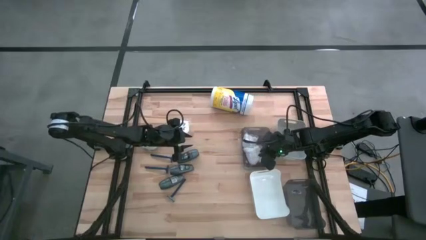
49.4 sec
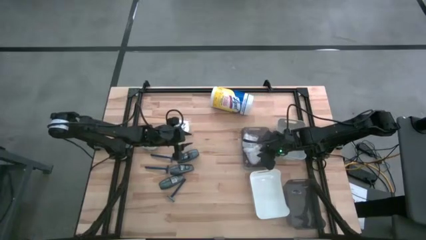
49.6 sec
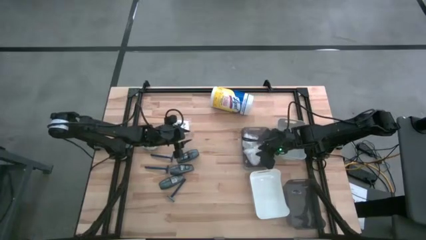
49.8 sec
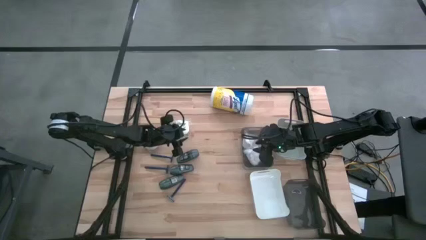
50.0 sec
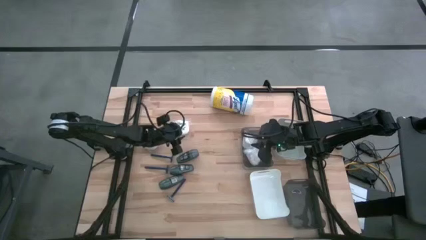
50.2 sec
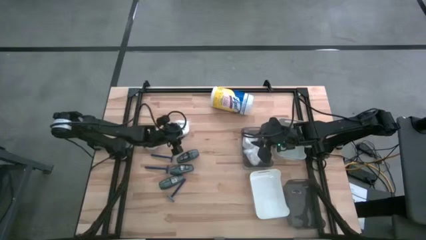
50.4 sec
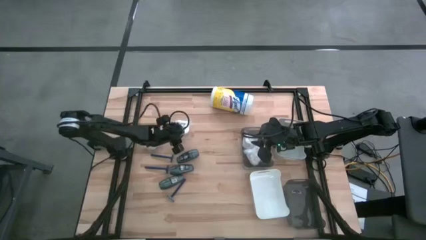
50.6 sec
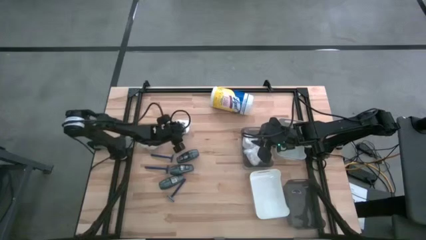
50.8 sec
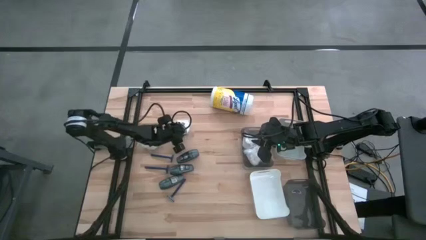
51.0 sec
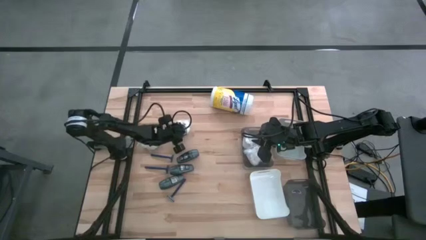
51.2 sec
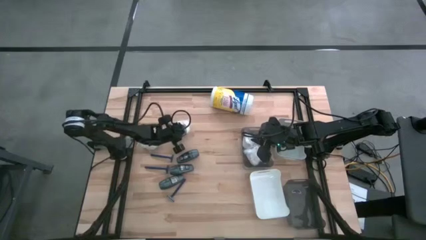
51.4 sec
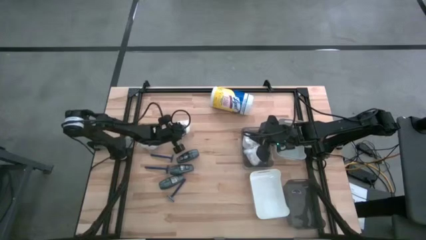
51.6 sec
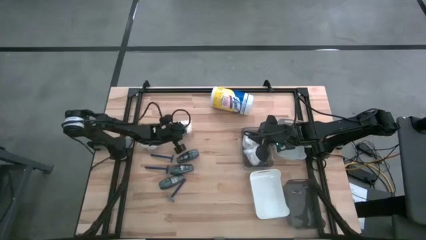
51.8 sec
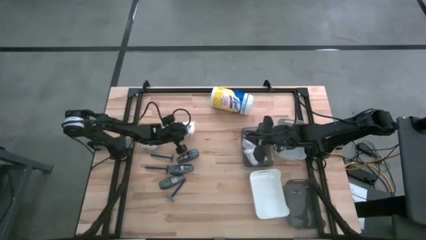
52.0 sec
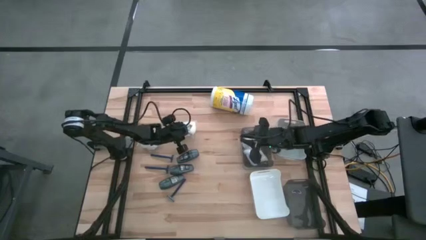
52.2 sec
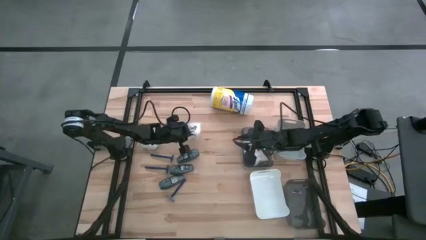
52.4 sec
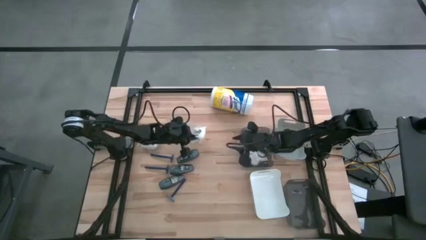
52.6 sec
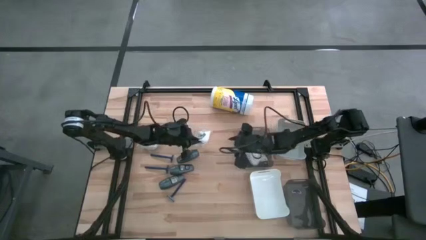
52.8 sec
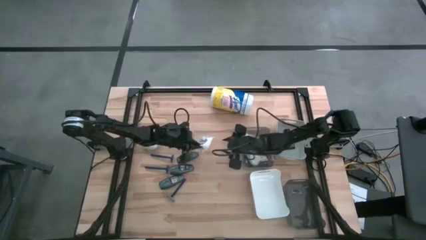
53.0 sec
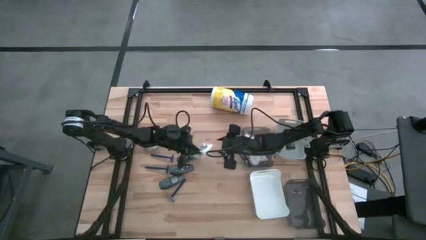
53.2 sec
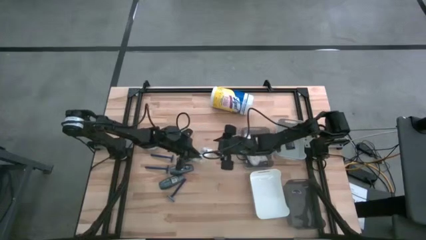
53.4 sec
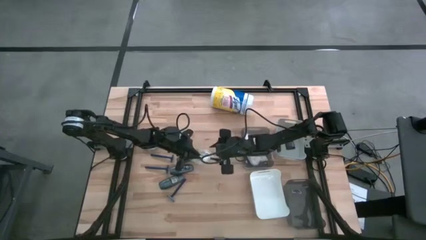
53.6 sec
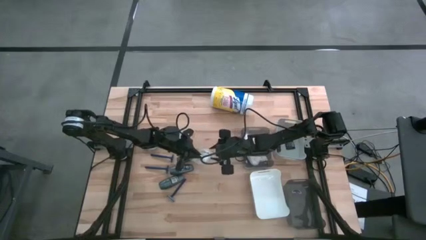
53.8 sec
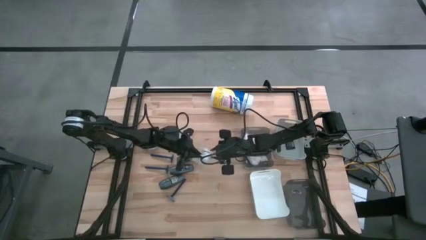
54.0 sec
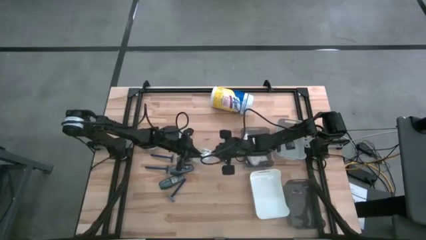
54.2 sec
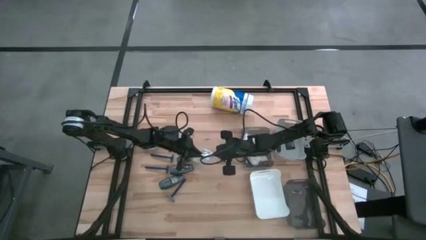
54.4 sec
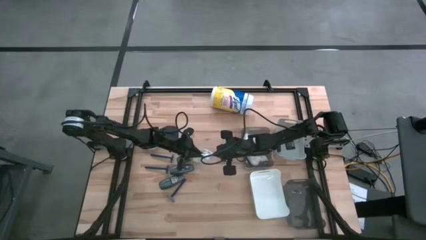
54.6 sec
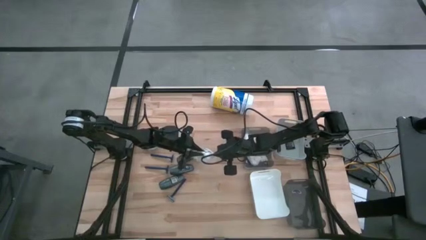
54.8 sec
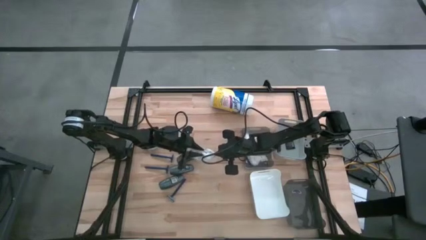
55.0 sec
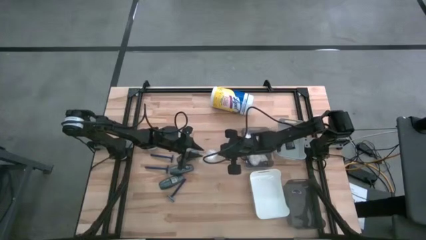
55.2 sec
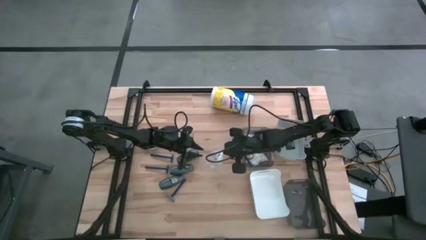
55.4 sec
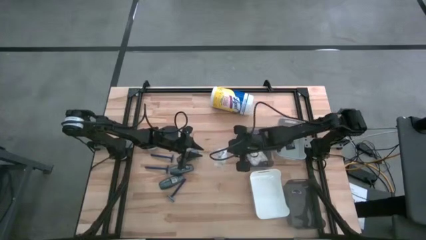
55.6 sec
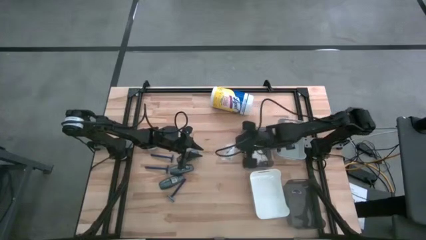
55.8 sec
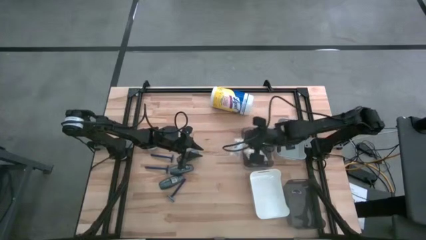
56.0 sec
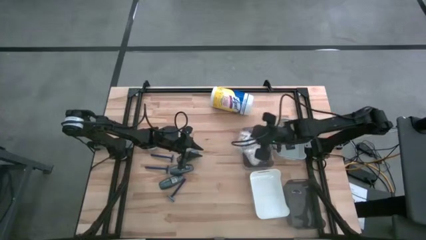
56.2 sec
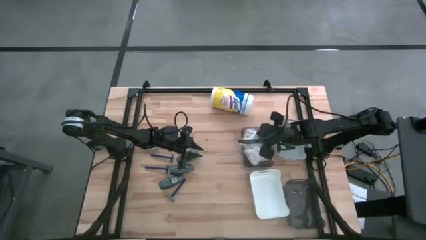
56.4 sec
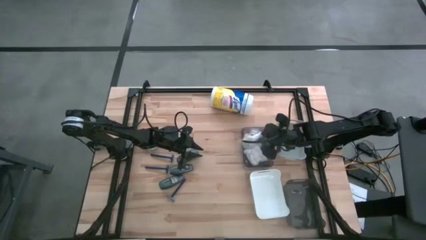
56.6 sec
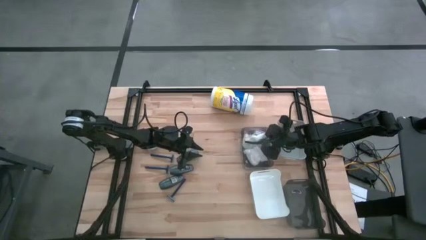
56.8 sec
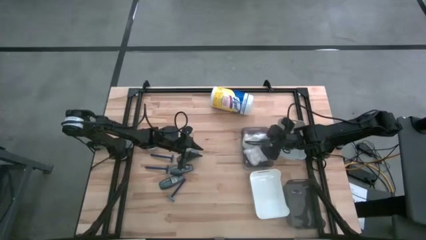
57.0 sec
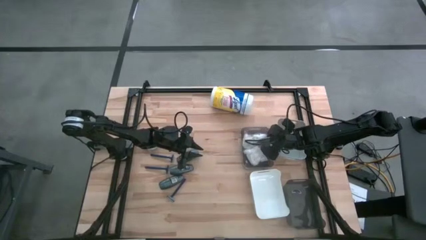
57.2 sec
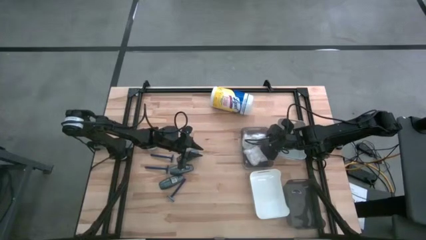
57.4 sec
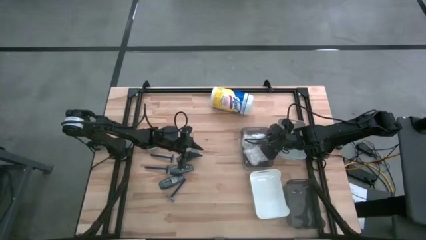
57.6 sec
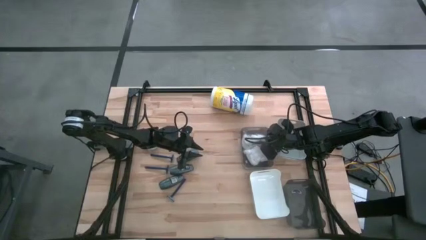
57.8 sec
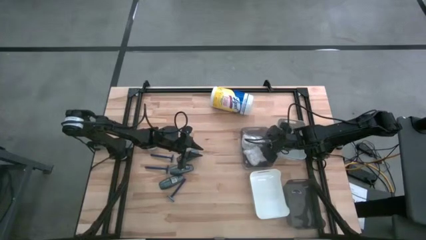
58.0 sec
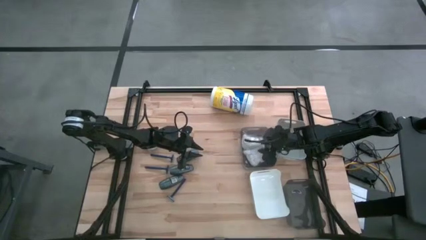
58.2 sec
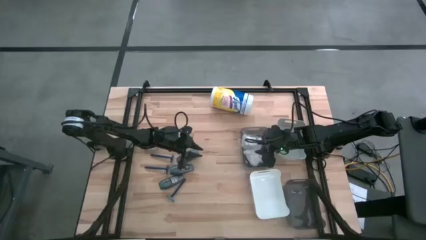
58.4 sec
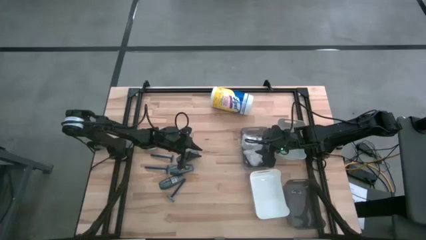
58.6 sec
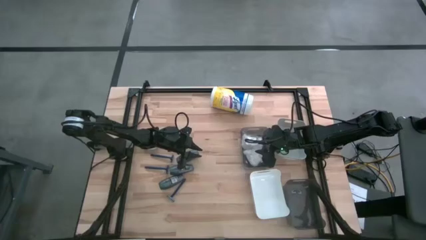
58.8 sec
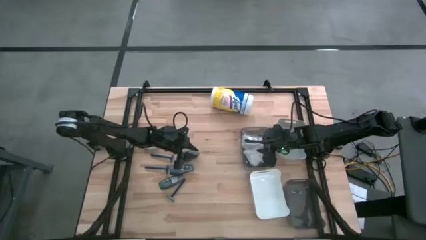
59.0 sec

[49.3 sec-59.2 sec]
Task: Pick & Place Travel size toiletries
Put the right cotton pack into the top black bin

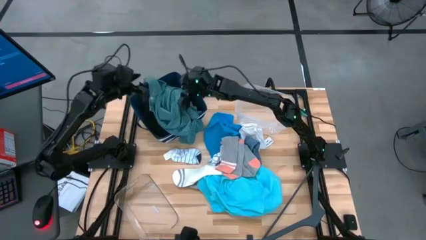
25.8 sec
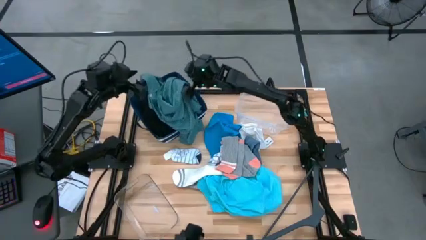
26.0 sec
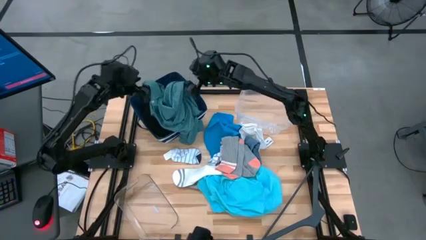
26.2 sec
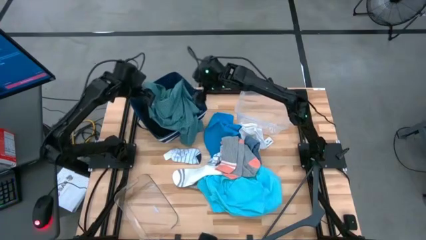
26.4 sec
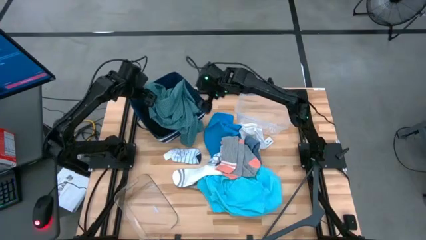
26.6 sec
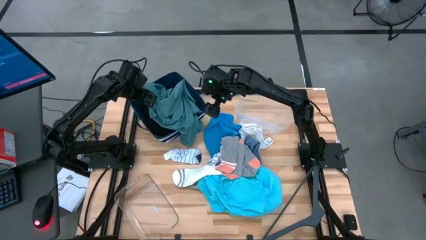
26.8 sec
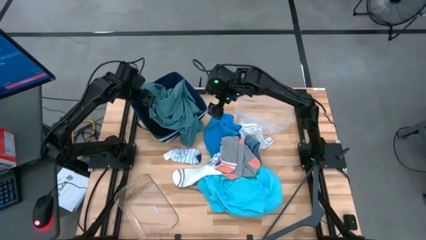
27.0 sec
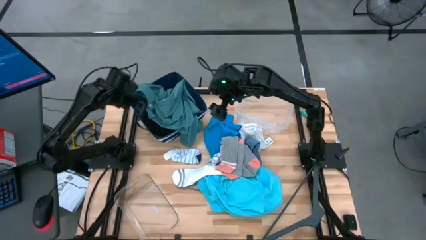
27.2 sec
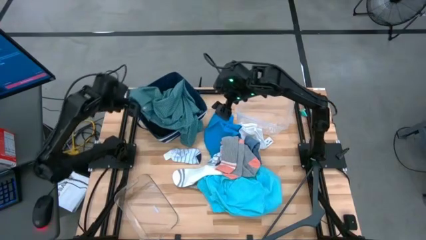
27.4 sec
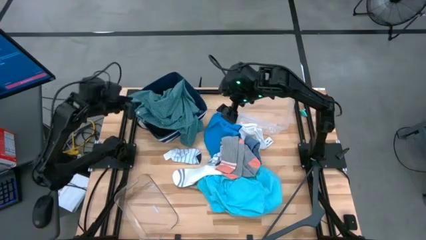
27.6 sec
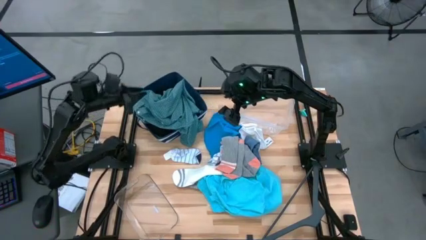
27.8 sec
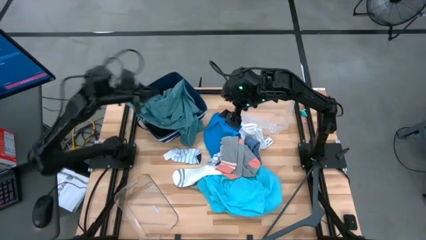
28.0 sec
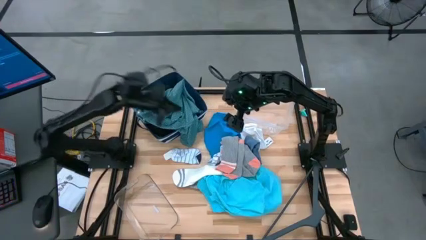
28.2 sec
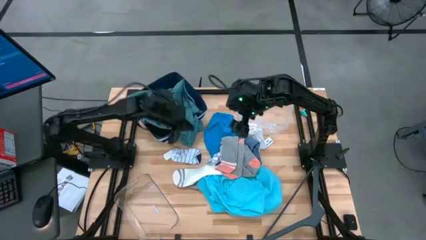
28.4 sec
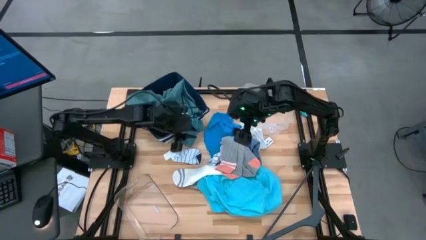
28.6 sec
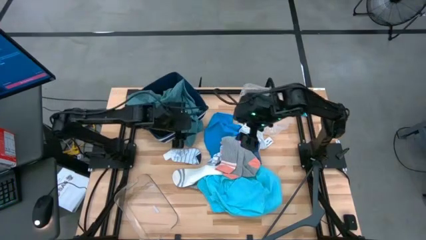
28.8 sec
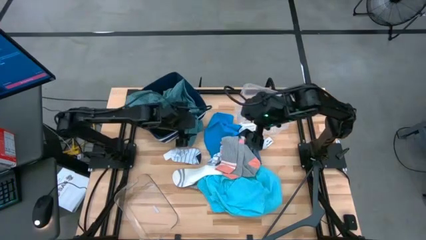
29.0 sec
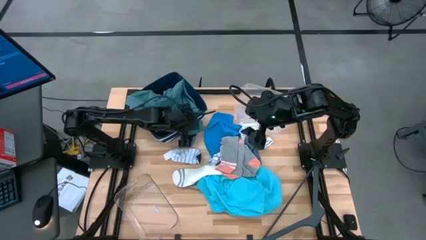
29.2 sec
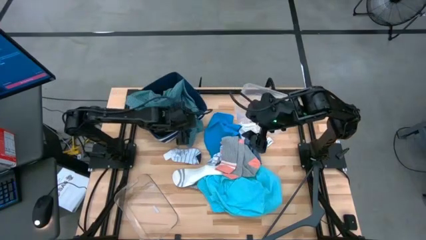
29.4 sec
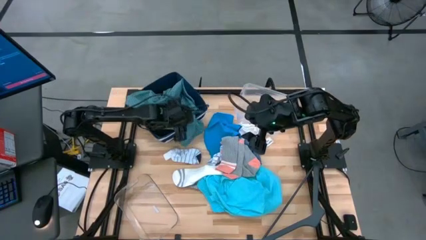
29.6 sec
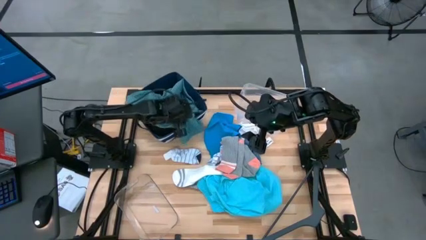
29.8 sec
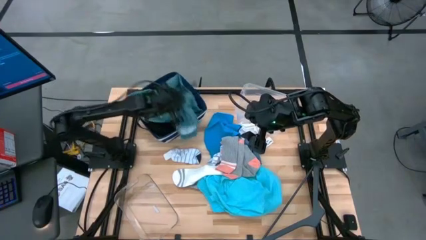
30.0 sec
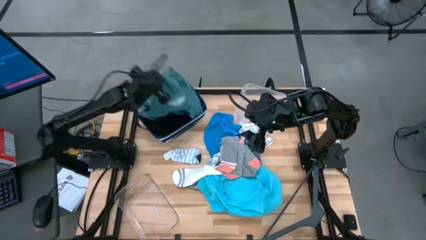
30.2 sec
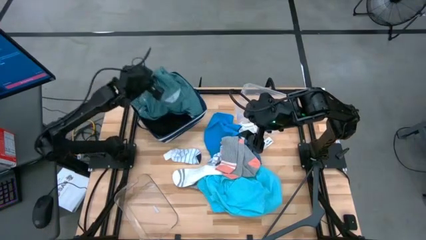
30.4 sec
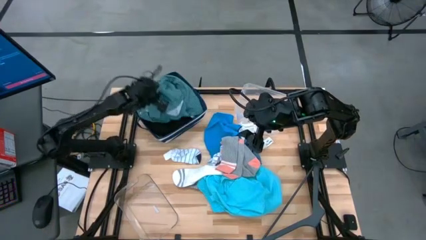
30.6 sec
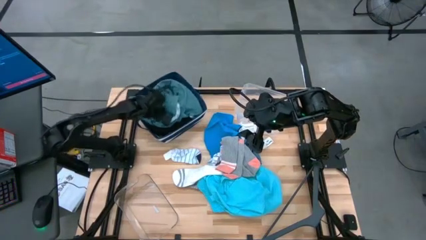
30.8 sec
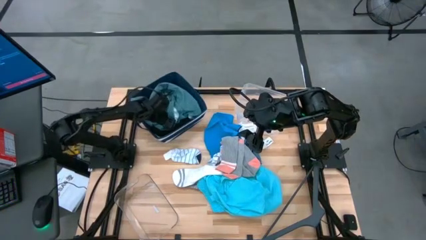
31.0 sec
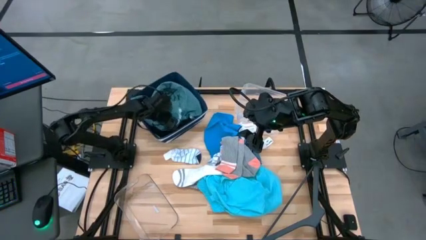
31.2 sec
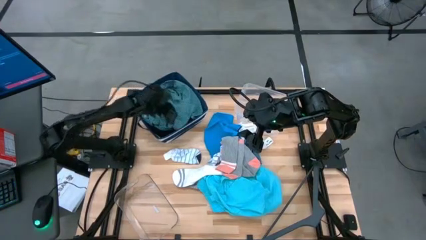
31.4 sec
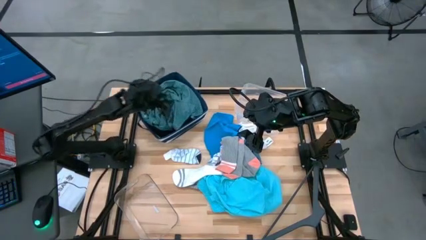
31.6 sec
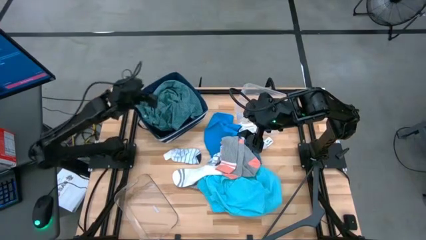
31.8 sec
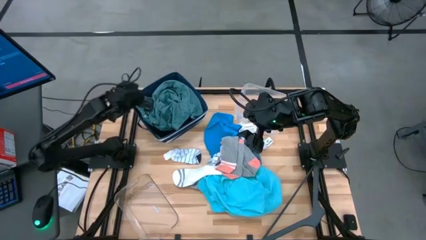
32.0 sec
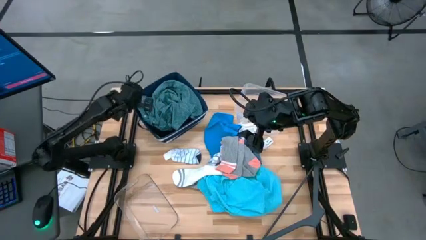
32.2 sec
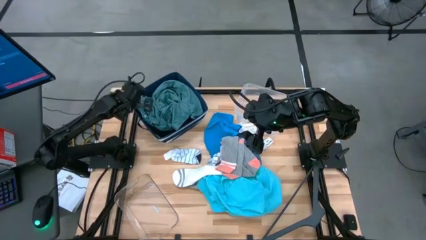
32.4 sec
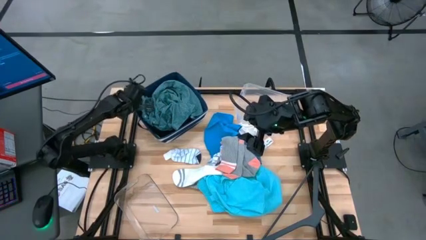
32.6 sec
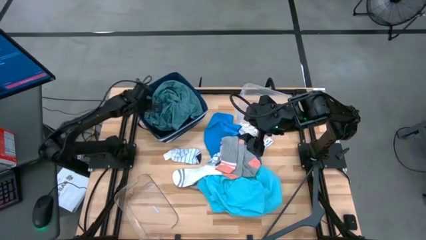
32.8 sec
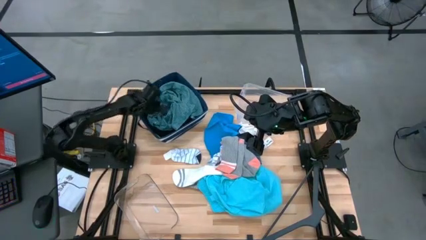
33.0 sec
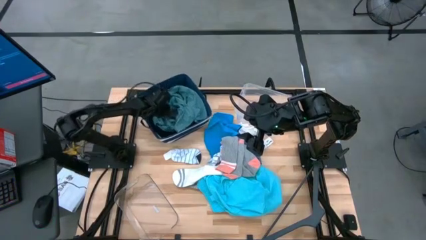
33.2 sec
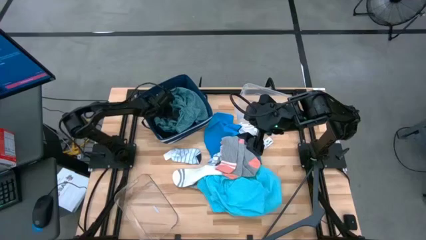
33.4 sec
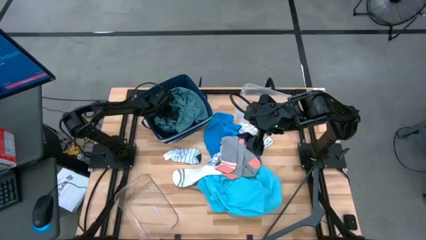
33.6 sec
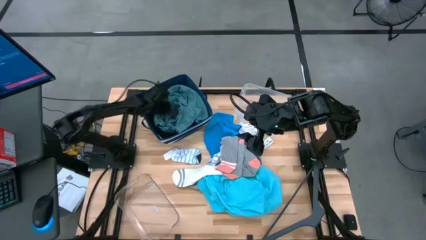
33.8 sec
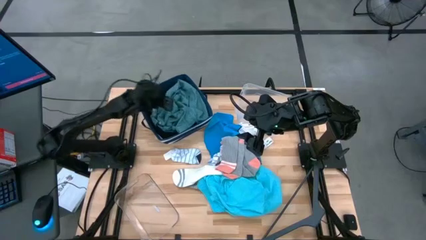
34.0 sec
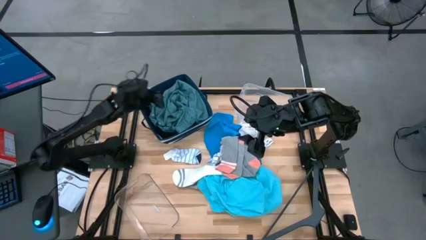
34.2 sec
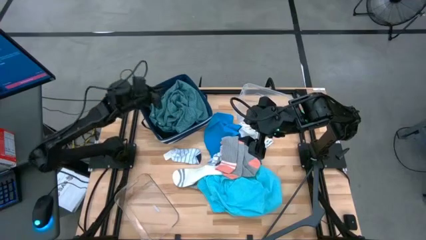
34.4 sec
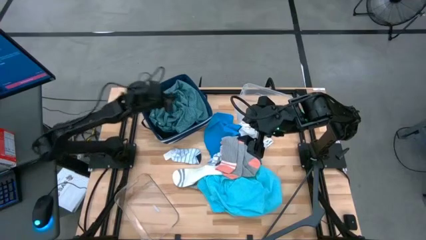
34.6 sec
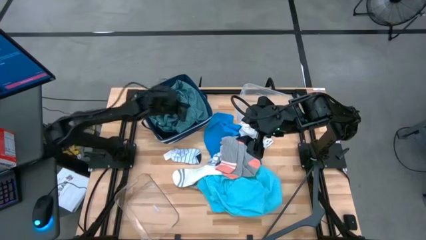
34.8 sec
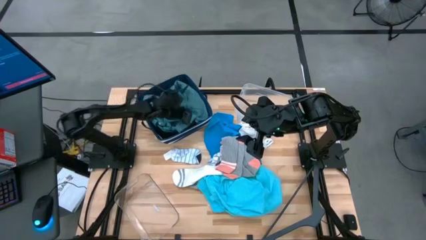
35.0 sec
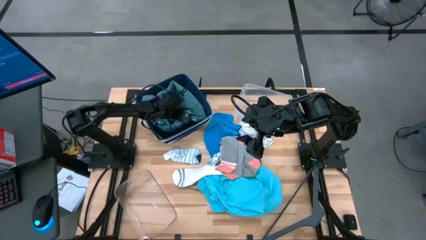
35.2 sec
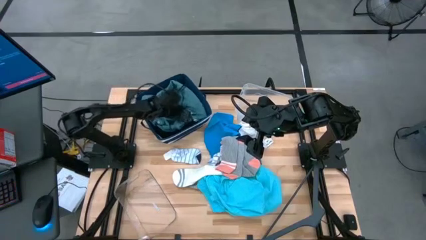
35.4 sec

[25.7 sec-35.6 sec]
Task: Pick & Place Cloths
Put the blue shirt into the blue bin
